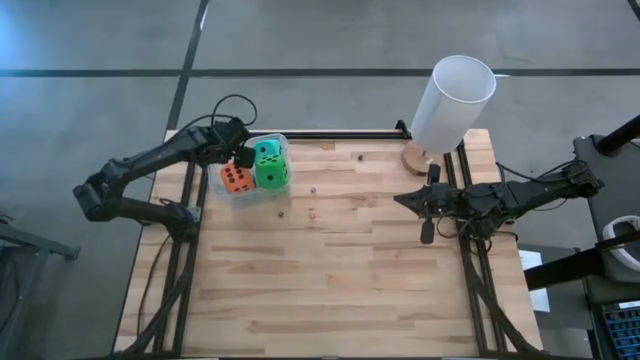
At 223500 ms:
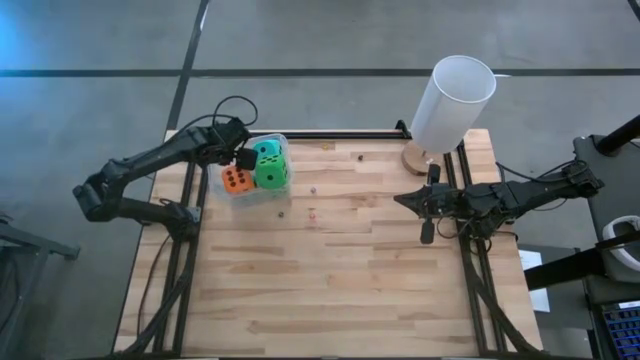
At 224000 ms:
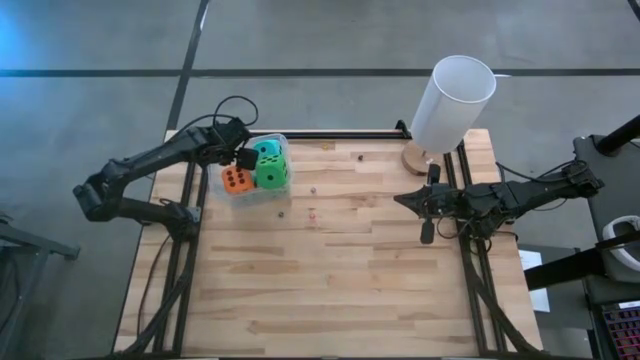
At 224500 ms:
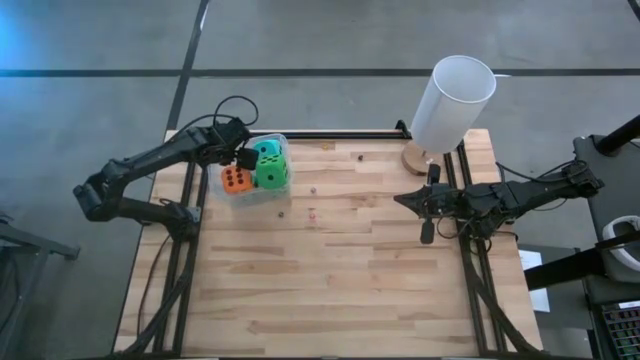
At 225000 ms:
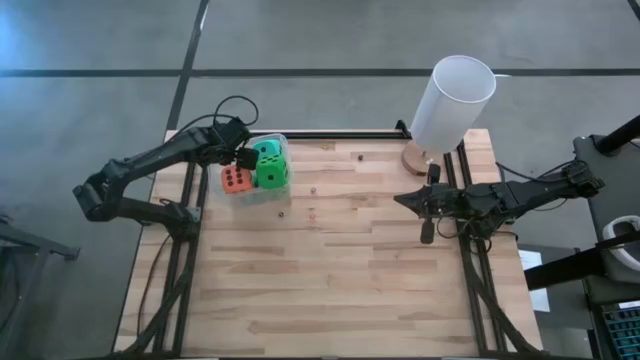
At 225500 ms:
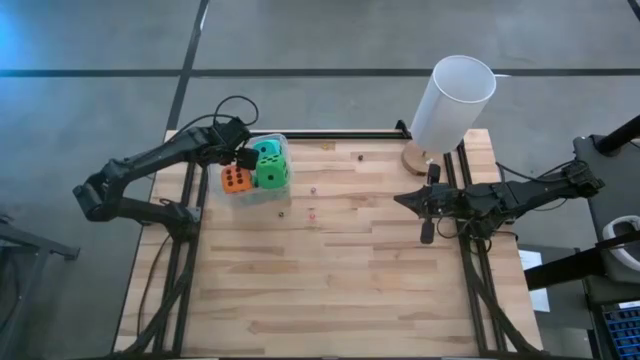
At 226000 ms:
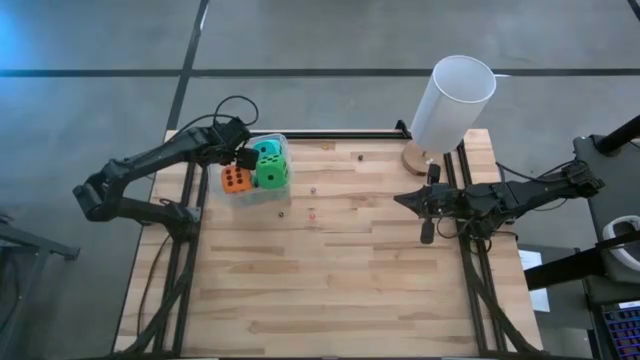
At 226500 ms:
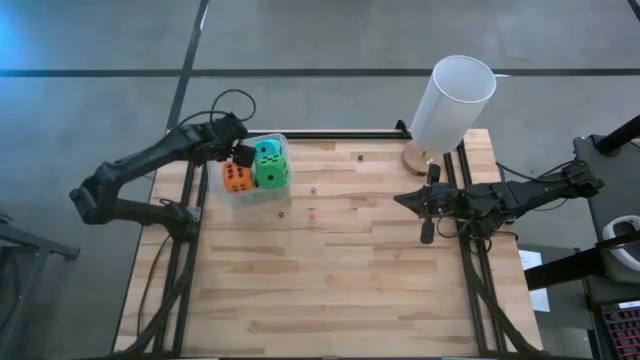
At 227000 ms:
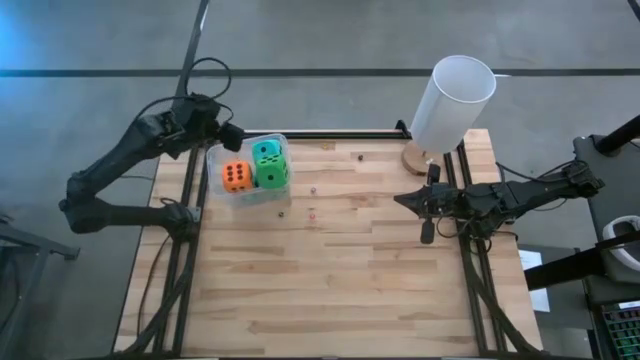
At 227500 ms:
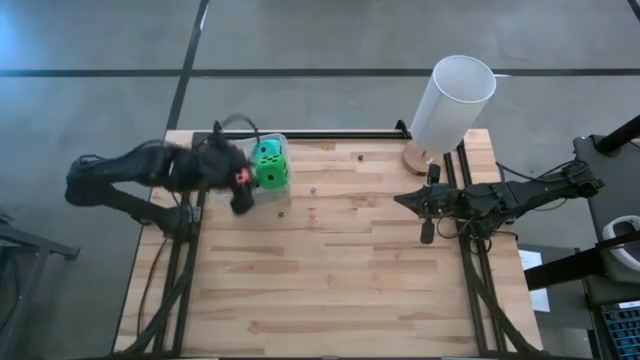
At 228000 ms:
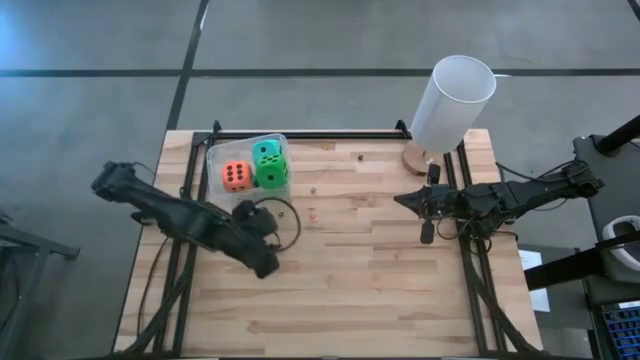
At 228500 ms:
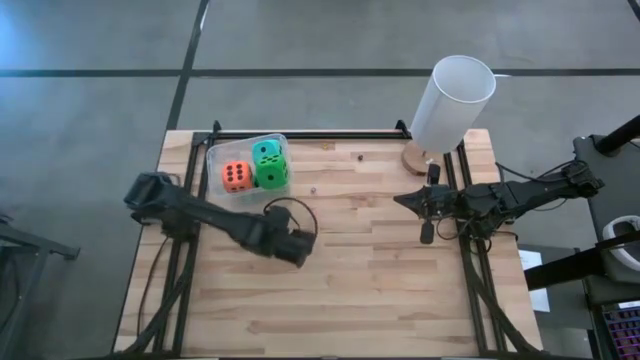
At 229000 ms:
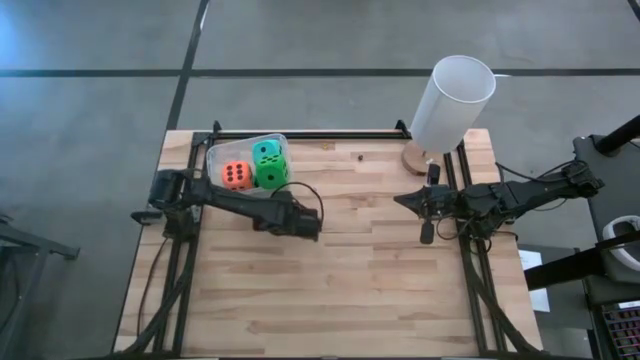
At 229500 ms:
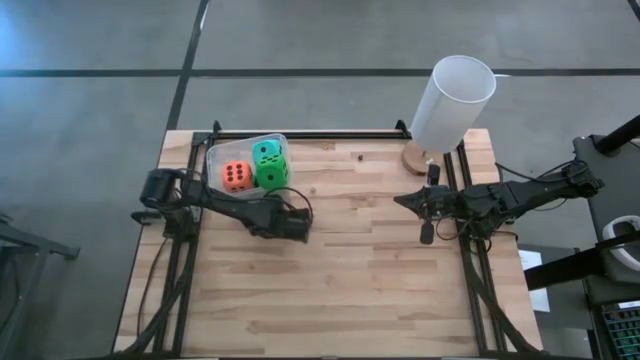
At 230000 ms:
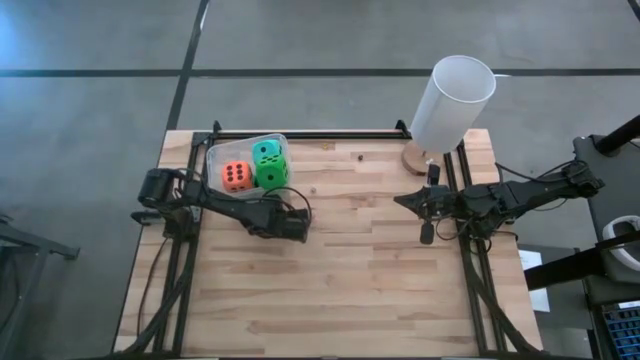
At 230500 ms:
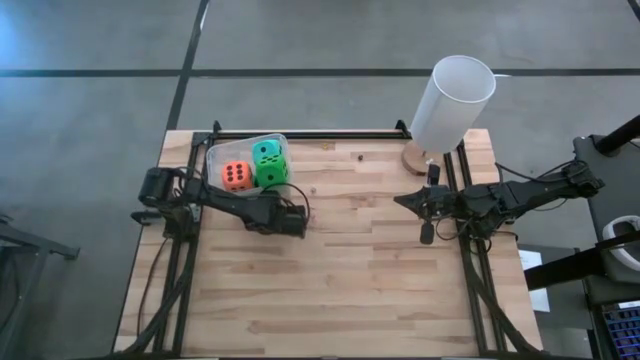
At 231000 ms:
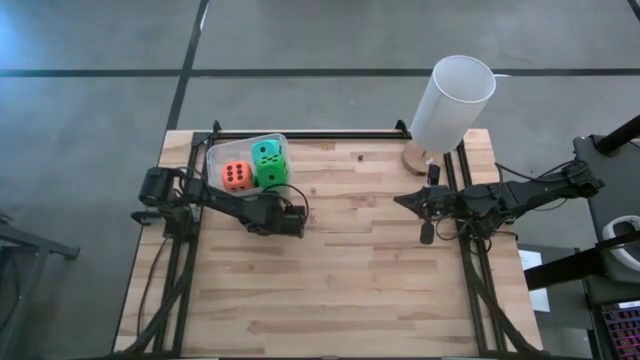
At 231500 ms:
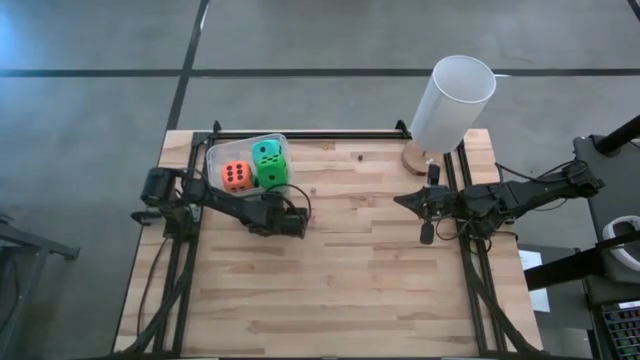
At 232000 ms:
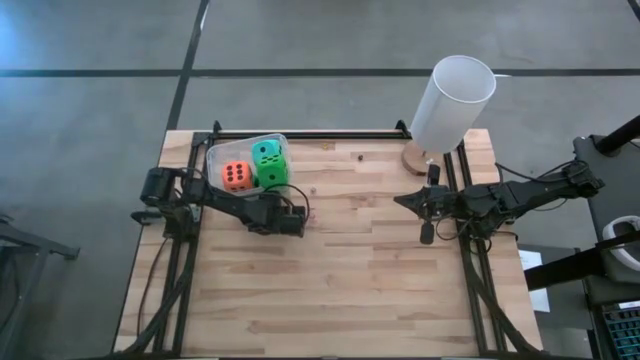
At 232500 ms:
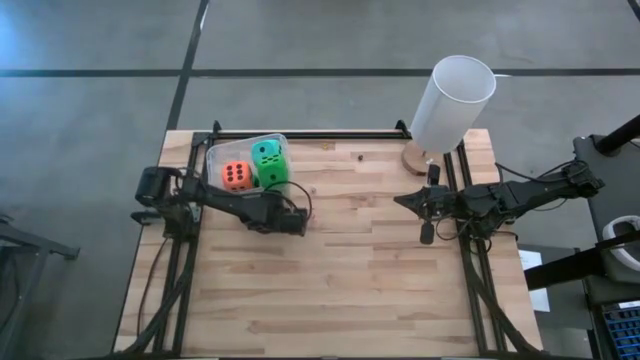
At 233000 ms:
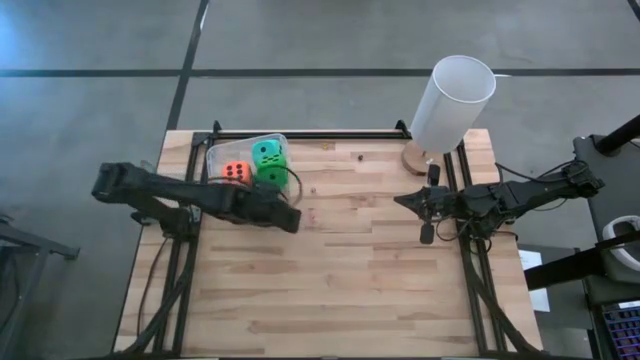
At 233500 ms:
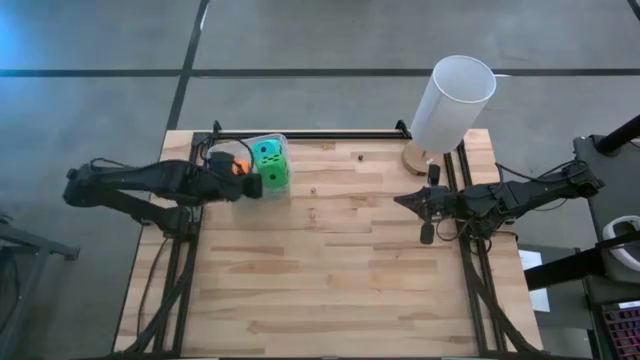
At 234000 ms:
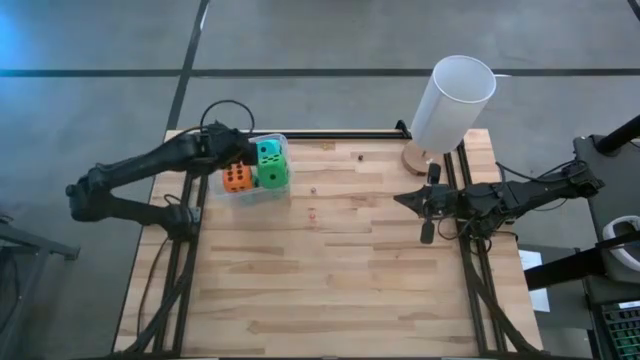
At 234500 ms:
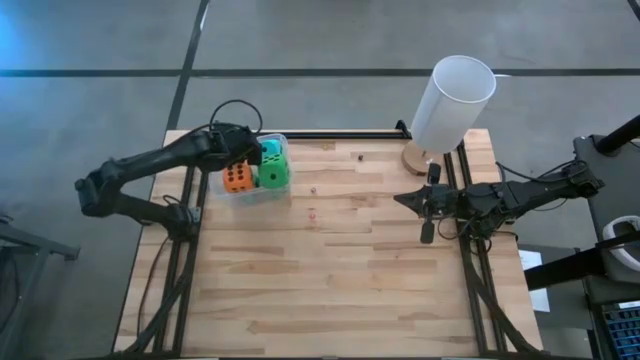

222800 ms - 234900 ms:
Task: Pick & Place Dice
Put the left small black dice into the transparent bin

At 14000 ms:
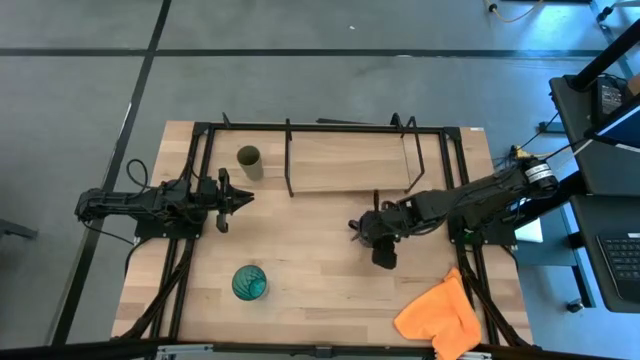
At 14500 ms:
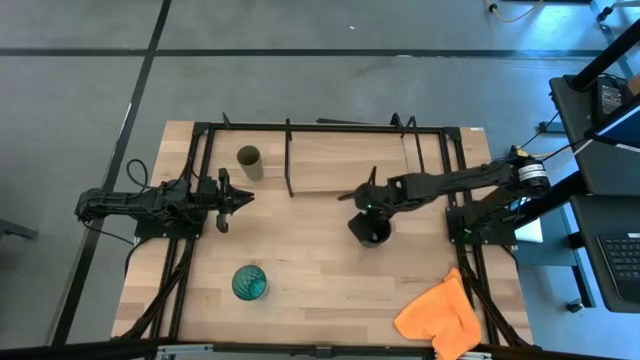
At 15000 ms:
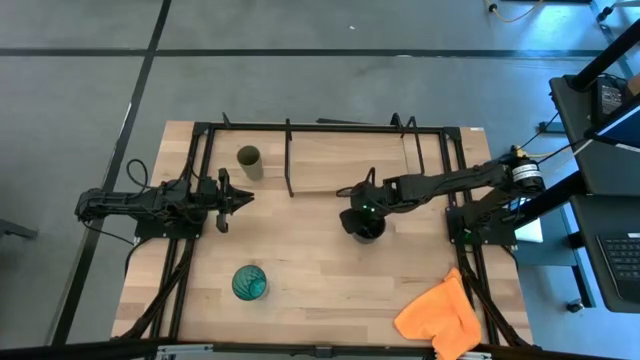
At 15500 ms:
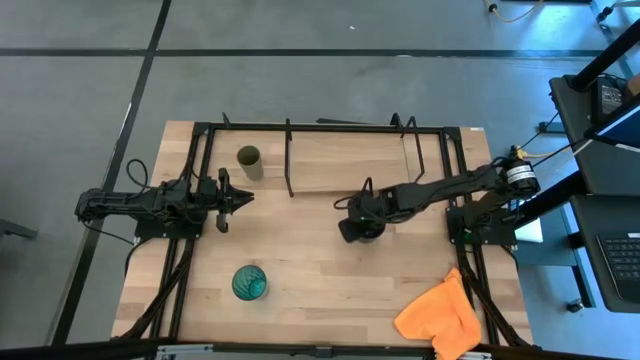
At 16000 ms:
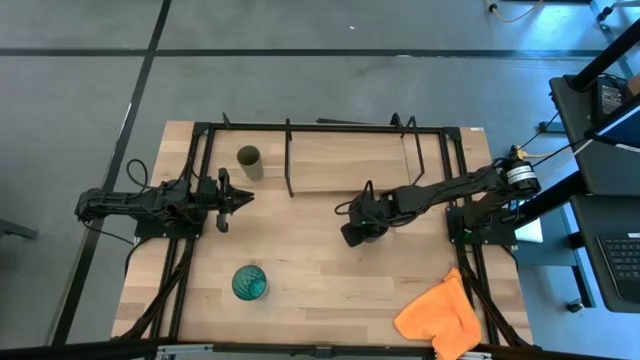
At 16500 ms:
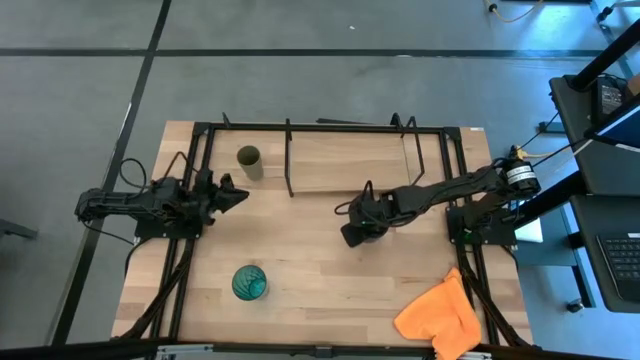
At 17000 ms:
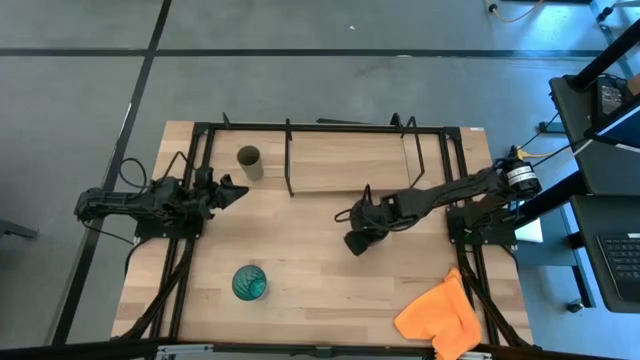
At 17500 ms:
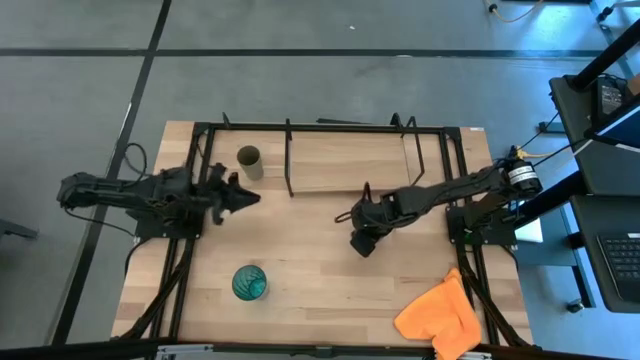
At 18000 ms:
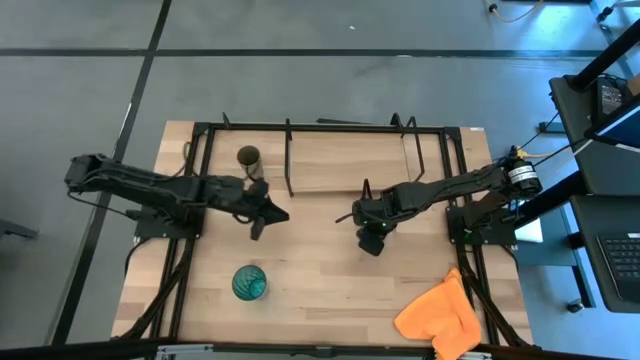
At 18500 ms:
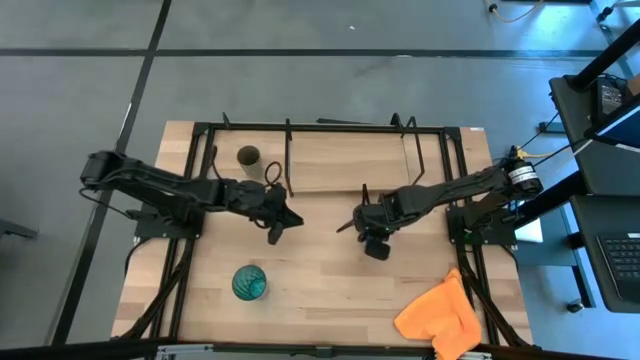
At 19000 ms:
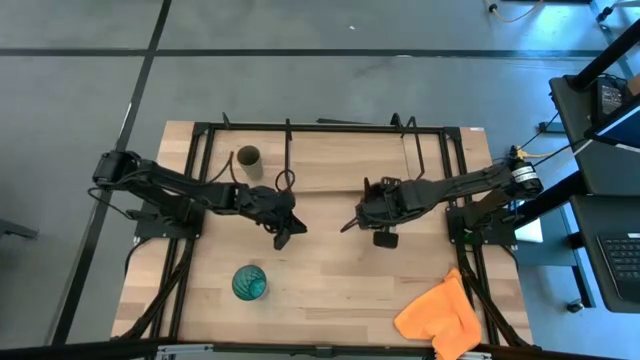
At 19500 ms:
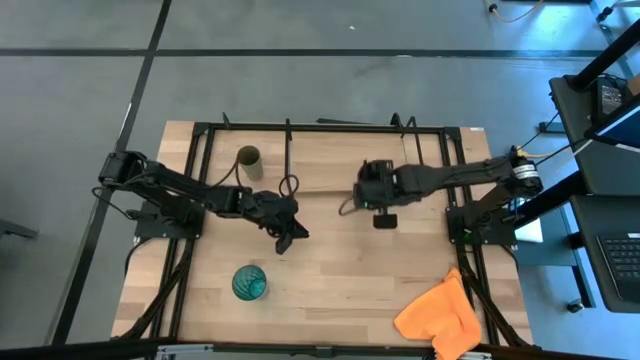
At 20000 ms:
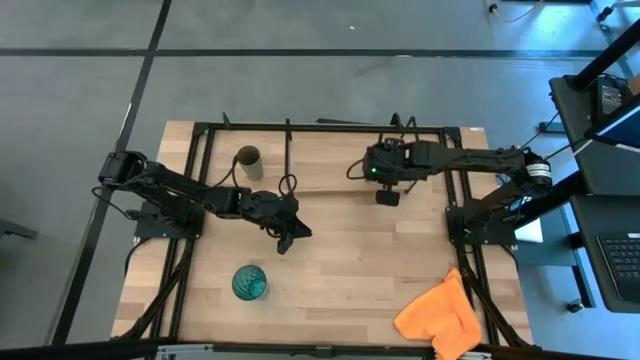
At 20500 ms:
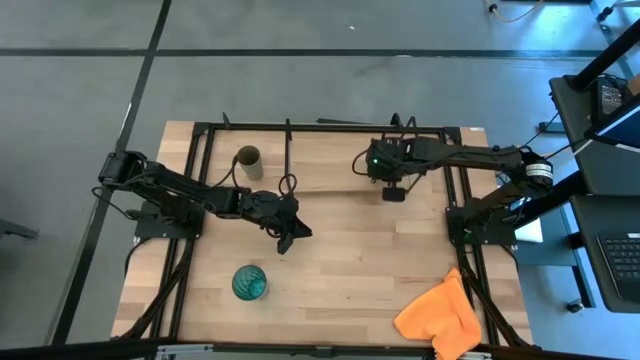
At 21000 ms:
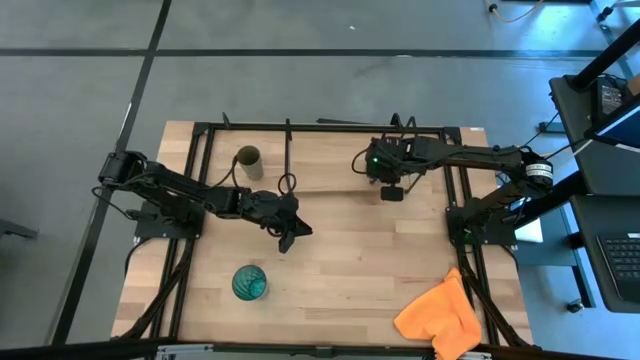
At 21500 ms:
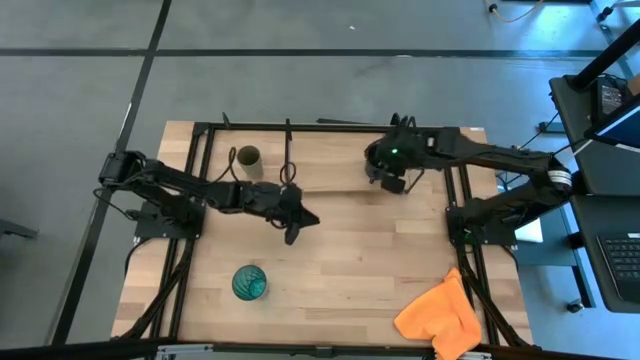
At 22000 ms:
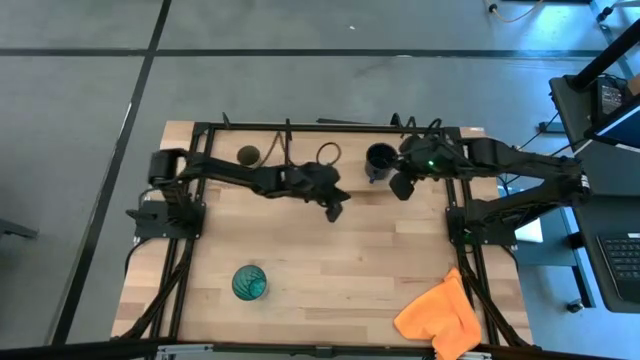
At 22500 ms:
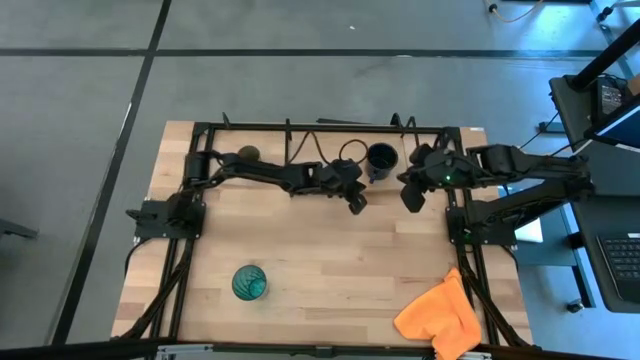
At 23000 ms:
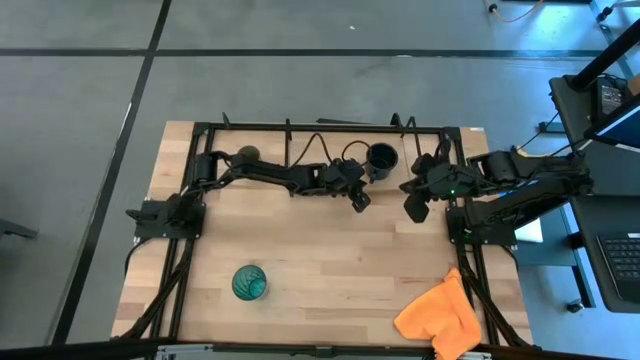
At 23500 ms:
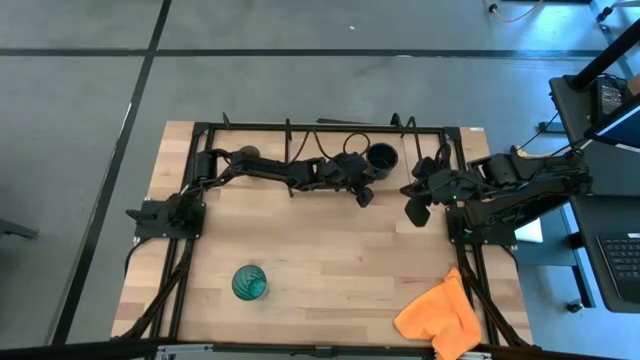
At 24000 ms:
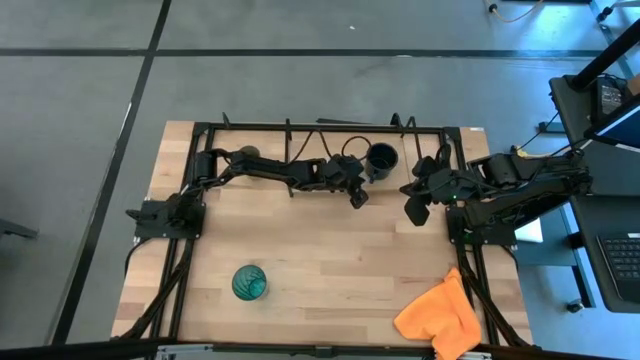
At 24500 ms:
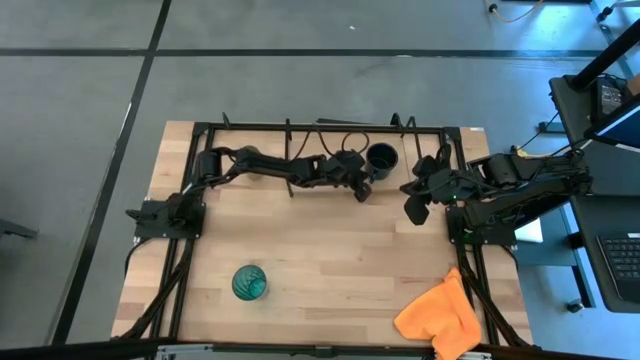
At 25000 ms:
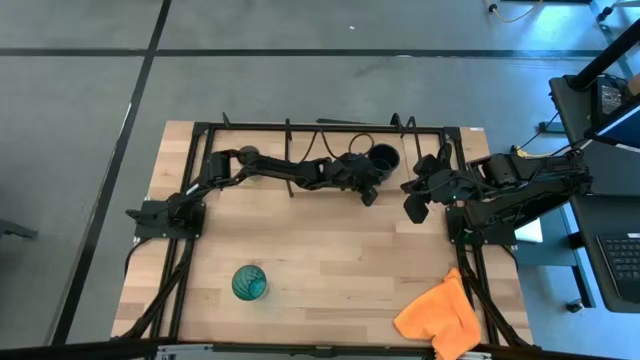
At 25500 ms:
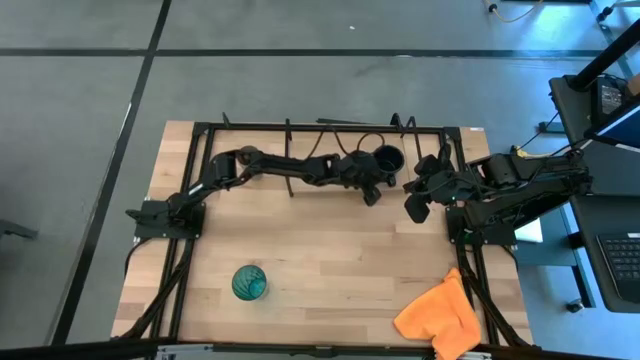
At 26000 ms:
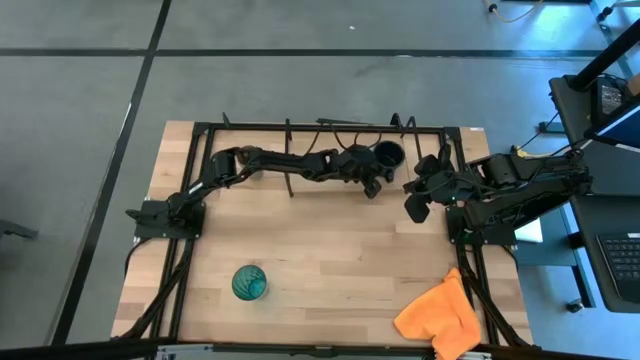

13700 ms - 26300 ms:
Task: Stack small to large cups/mugs on shelf
Put the blue mug on the shelf
